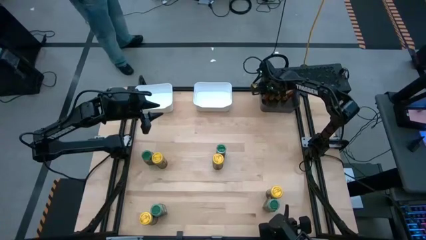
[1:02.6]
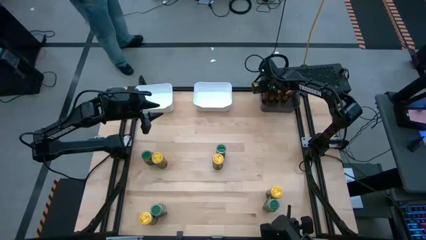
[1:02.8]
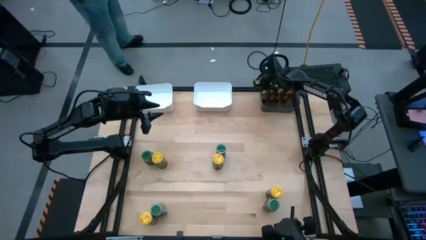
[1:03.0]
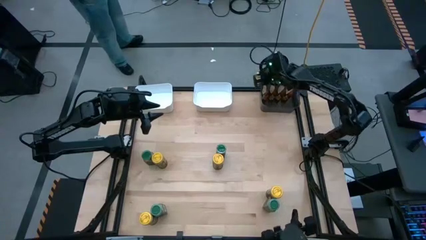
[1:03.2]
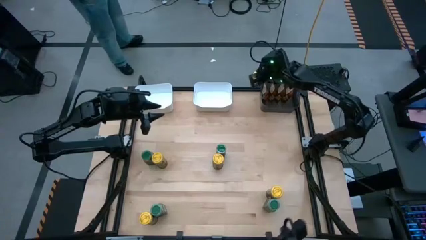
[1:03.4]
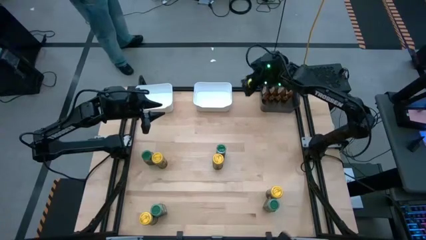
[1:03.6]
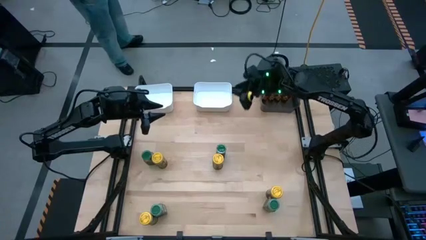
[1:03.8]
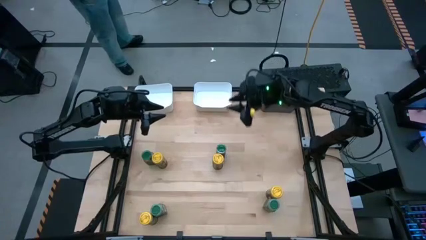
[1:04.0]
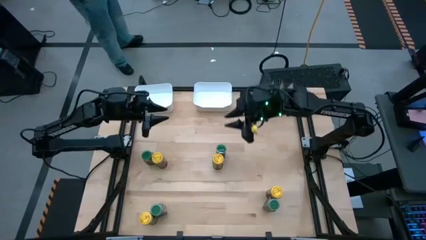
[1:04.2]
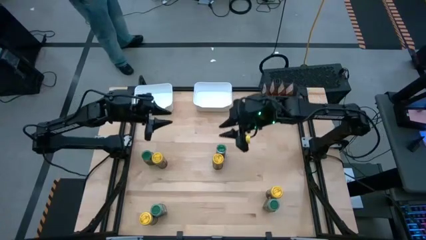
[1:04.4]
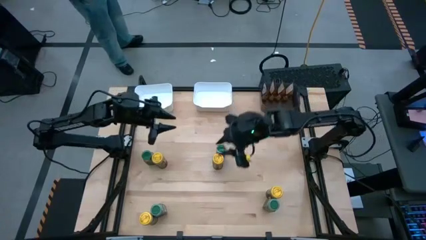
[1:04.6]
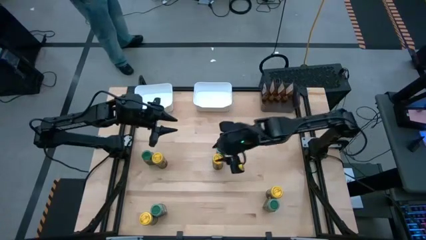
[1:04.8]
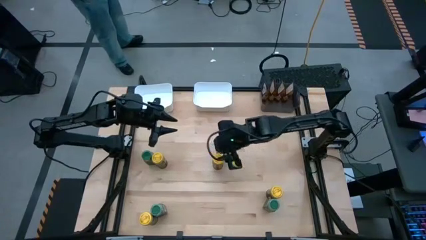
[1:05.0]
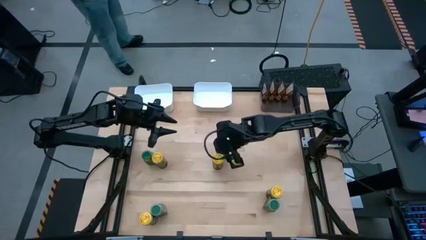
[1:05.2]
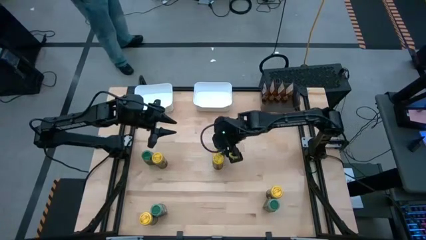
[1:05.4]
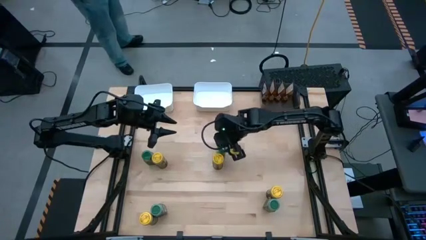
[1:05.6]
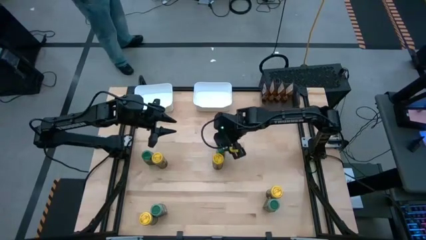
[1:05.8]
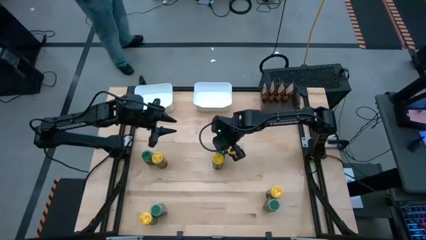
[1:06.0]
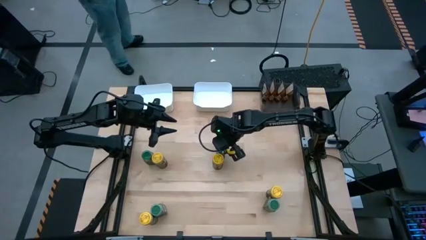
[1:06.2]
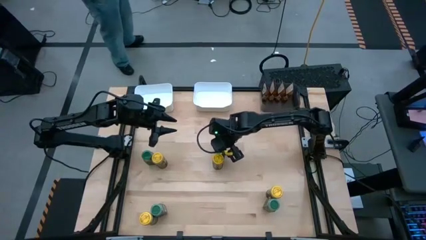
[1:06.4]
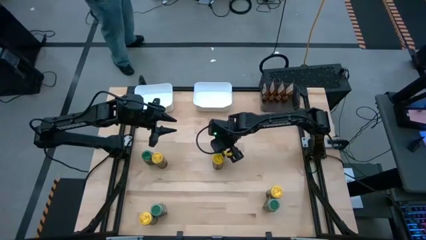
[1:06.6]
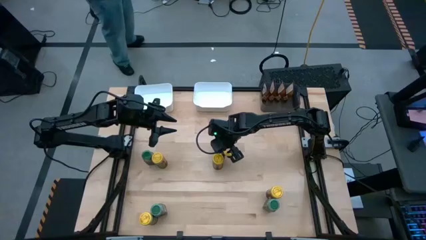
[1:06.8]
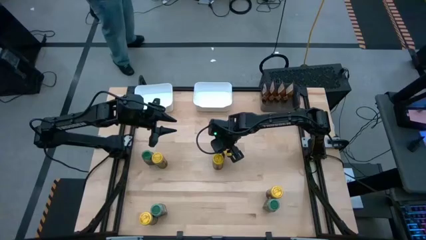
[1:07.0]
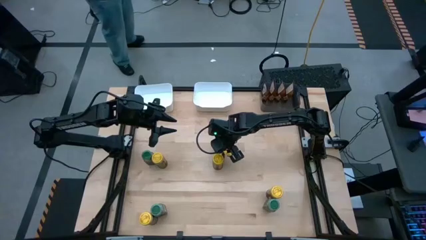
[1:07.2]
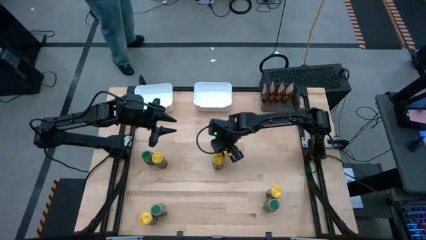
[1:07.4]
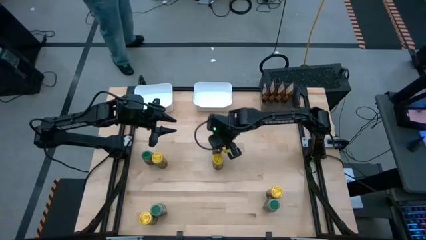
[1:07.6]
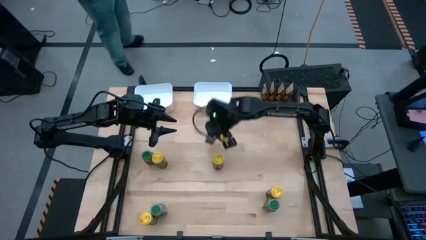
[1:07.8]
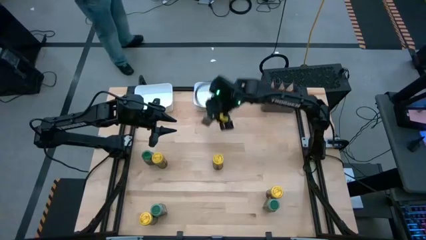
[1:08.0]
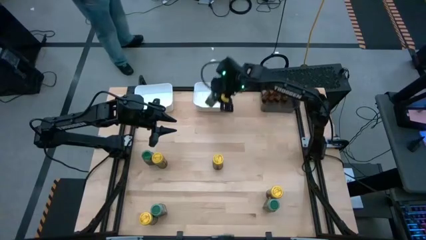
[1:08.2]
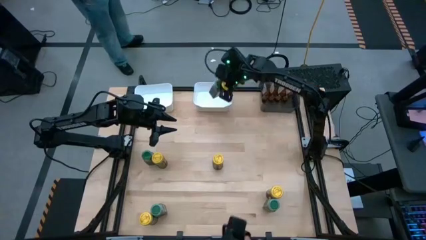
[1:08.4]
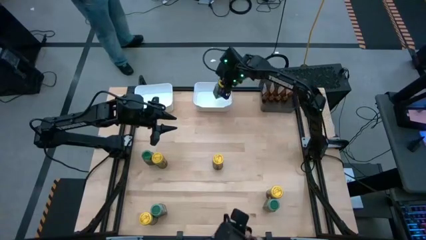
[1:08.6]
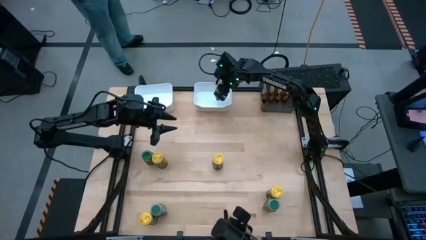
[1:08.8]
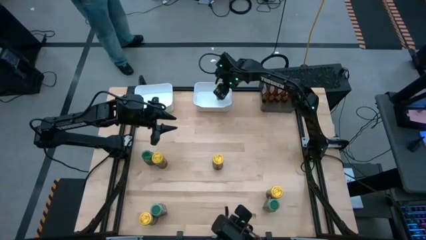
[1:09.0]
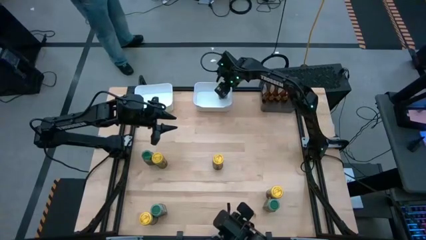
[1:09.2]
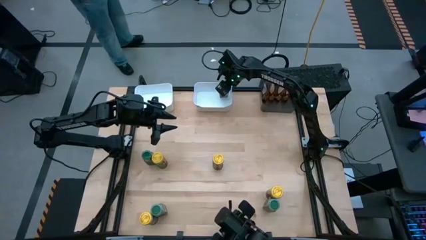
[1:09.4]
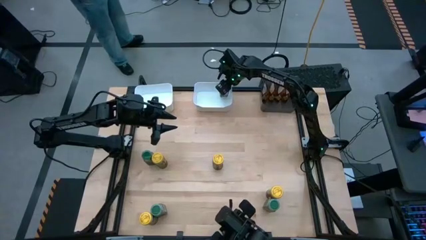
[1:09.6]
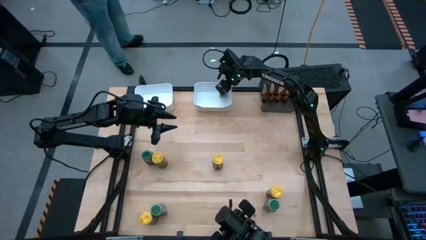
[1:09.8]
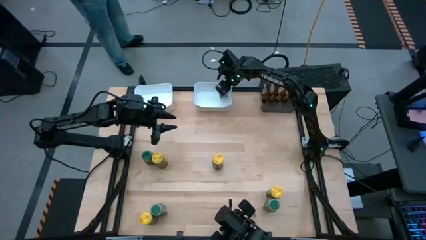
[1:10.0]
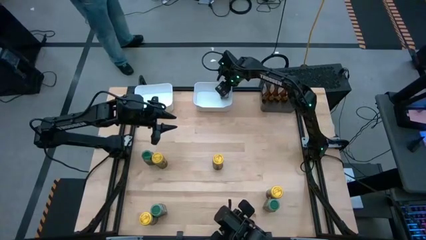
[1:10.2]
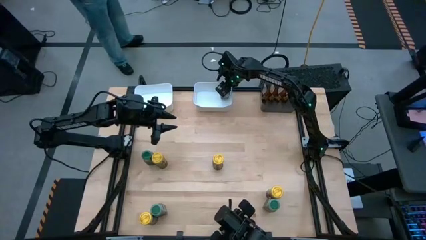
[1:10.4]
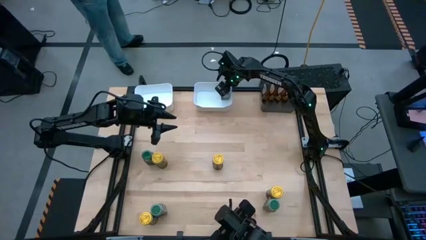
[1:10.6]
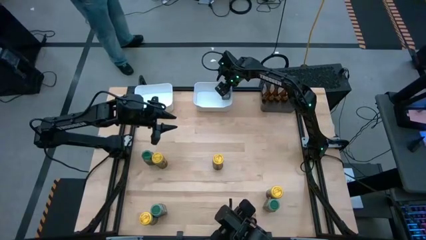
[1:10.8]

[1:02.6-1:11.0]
Task: Sort spices by type
Put the top right green seasoning bottle into the right white bin

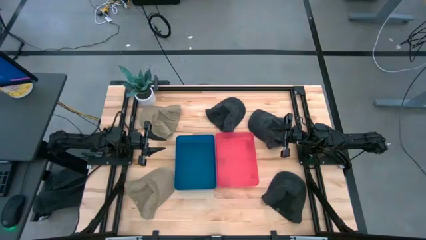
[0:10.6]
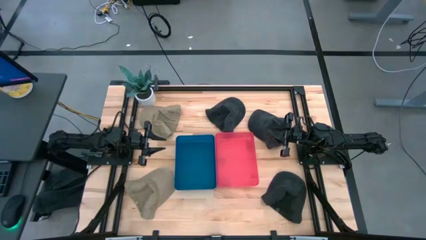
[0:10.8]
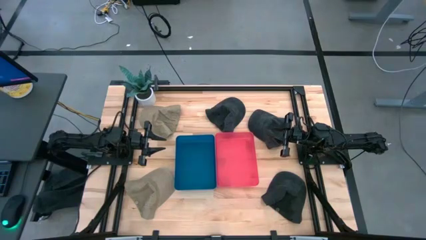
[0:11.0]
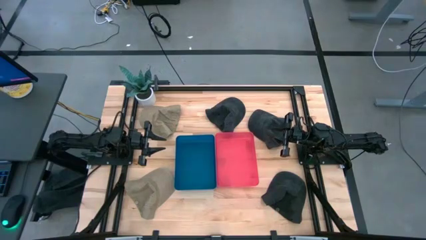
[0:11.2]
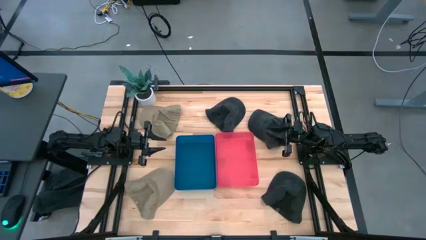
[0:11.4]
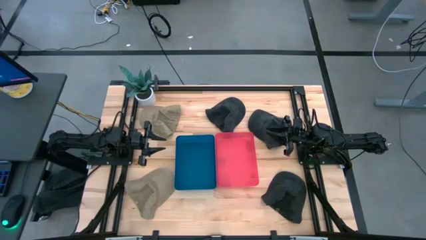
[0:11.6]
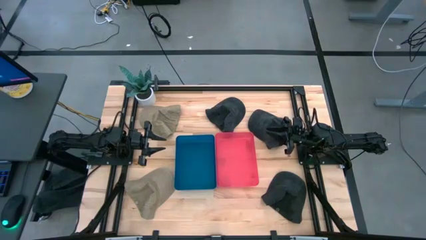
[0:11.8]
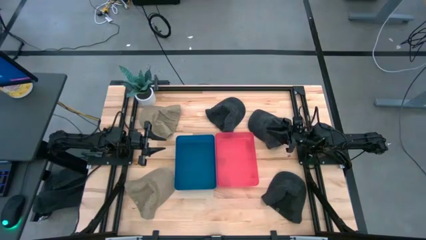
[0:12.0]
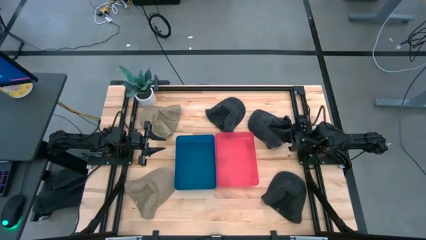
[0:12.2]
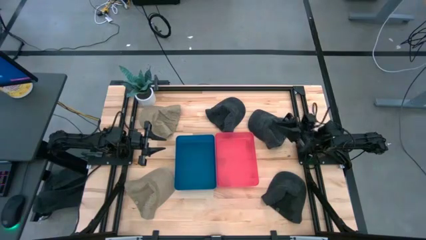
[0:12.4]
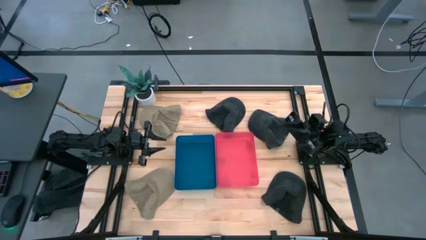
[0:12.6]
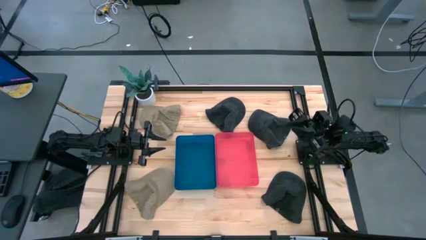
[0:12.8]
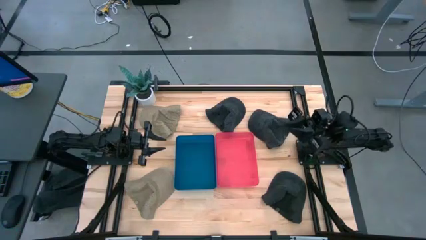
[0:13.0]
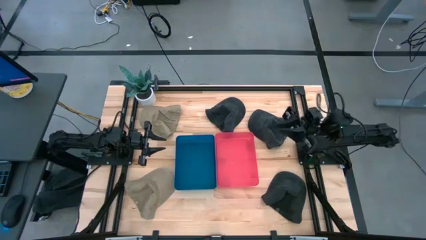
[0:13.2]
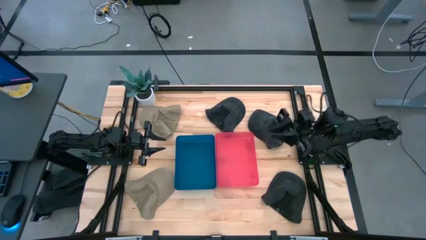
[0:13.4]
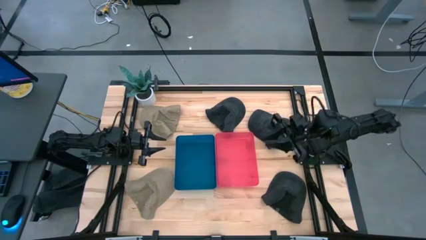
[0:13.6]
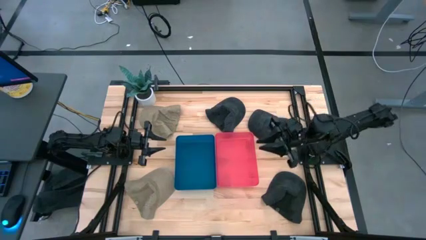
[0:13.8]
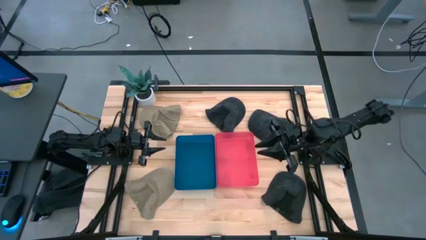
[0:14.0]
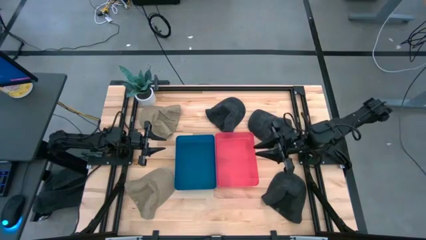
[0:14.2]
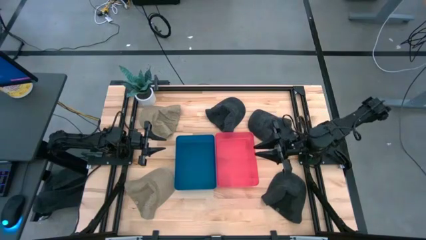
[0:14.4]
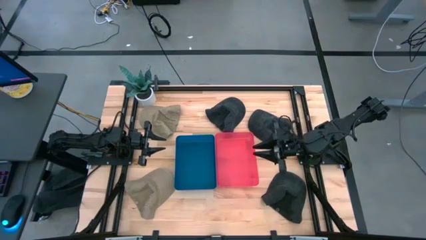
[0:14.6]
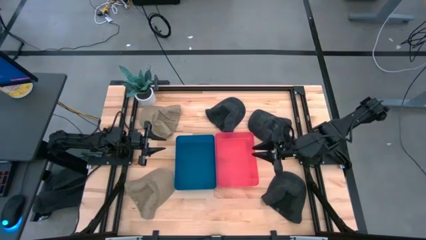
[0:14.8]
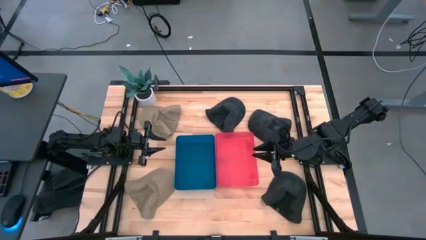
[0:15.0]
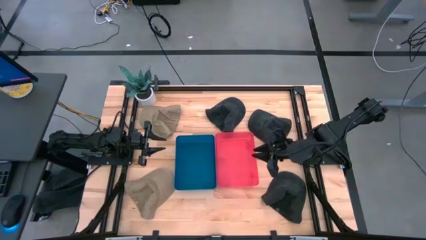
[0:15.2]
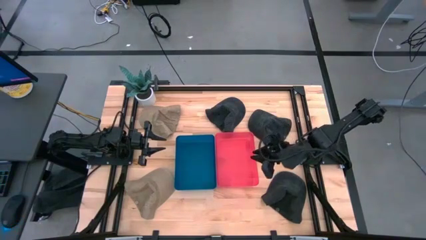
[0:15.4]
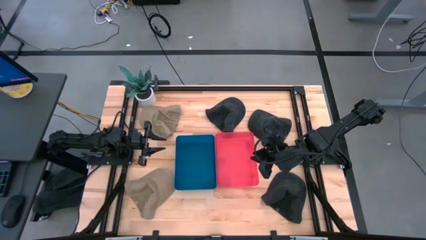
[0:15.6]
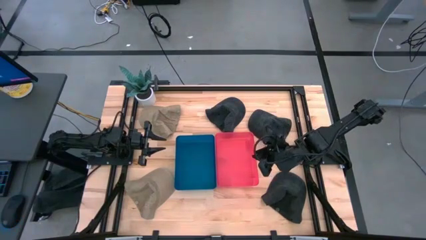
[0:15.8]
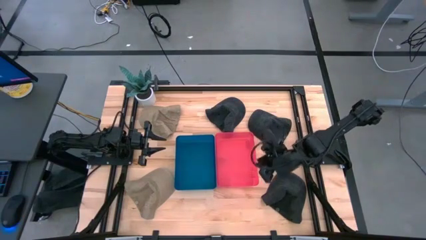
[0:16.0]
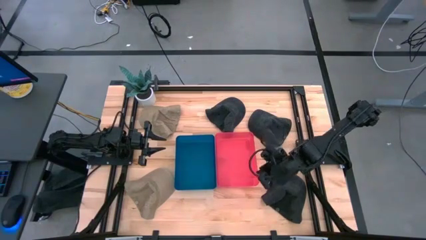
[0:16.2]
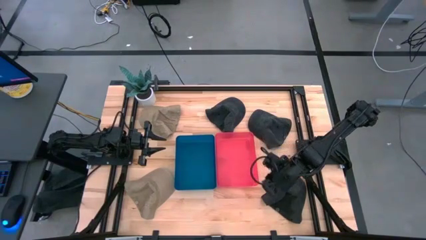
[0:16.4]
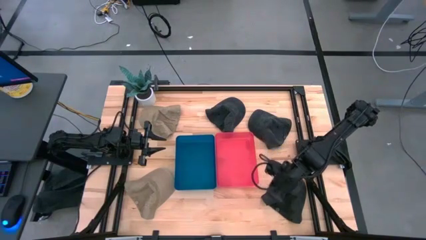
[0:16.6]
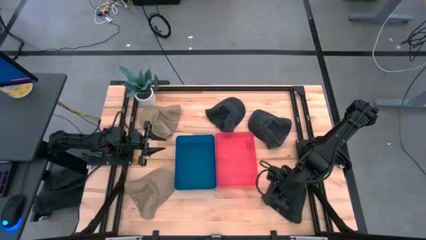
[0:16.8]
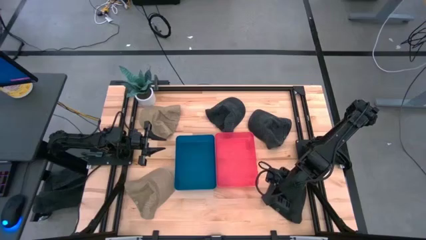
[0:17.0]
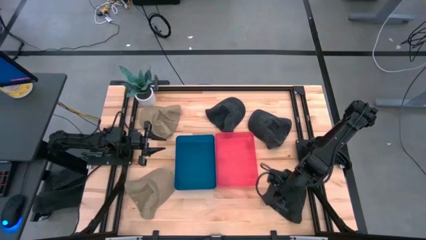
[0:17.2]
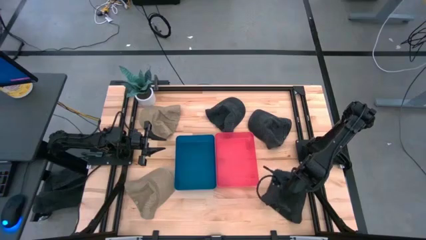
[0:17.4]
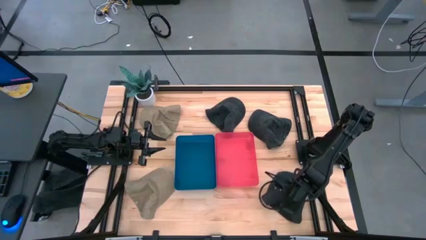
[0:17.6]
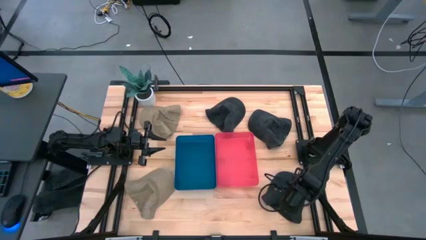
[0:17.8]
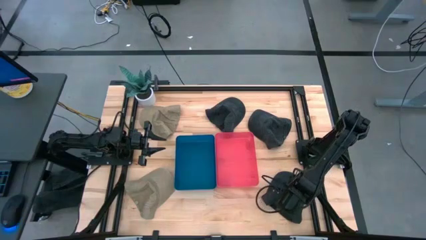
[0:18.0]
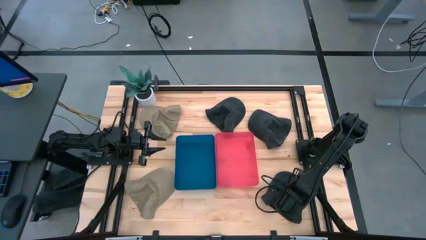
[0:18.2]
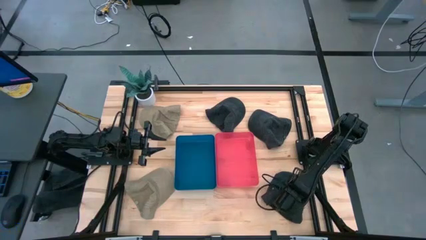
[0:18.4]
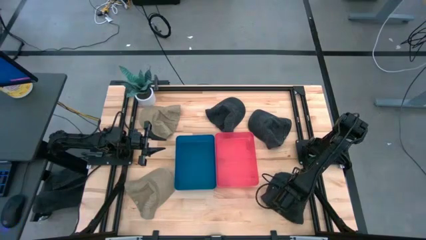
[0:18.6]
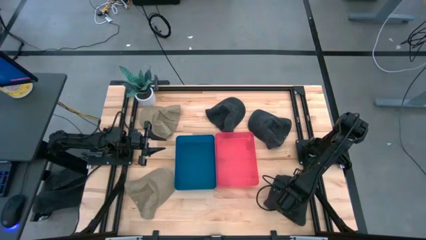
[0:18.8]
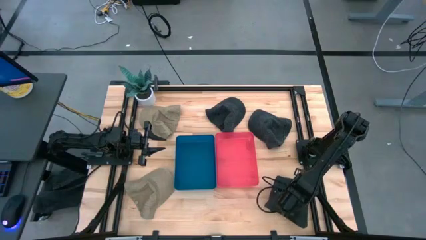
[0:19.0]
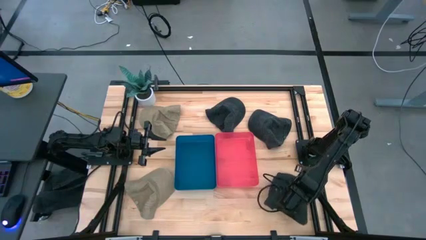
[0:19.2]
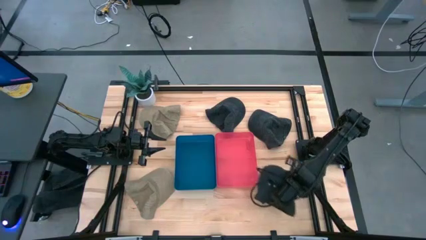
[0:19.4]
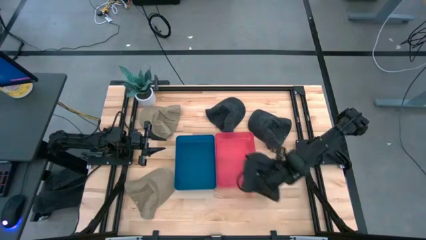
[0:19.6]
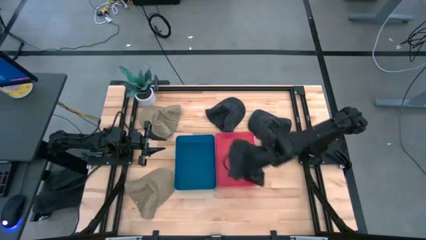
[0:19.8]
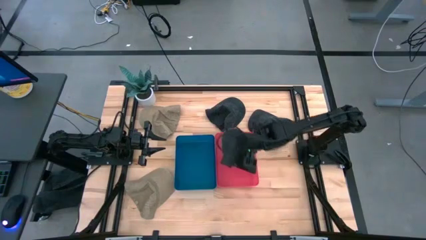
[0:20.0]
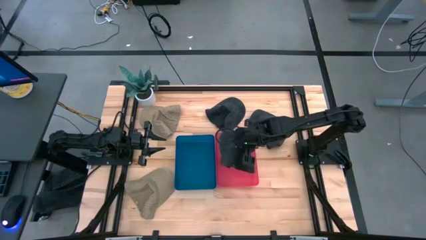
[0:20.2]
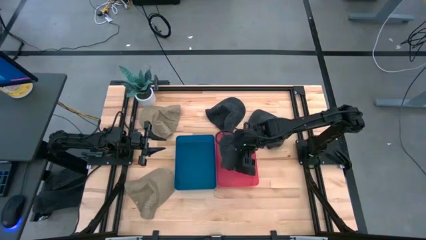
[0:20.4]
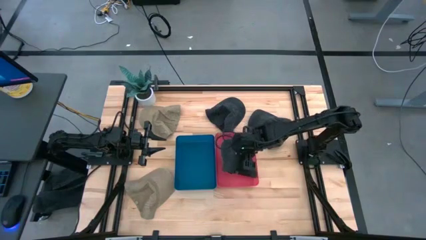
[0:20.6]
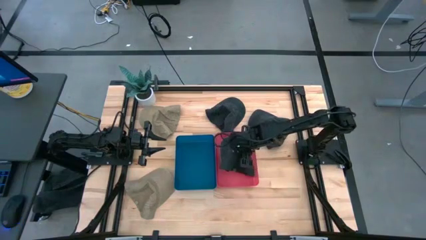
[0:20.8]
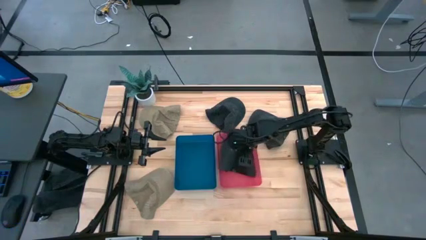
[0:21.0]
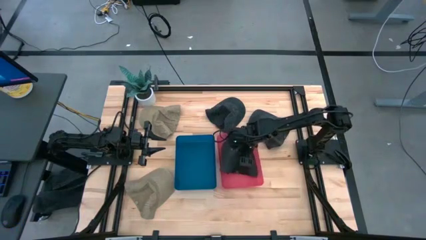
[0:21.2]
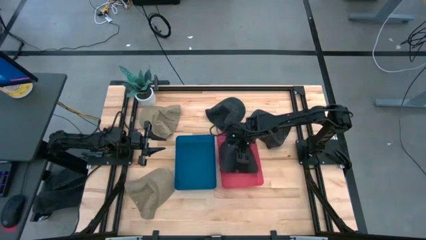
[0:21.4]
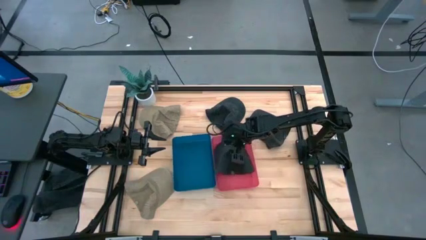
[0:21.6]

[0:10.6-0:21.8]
Task: Pick & Place hat
Put the bottom black cap into the pink bin
